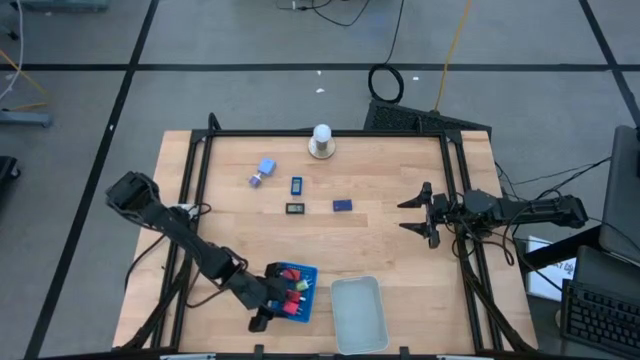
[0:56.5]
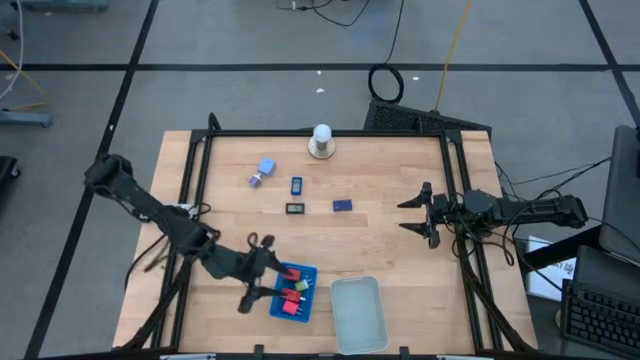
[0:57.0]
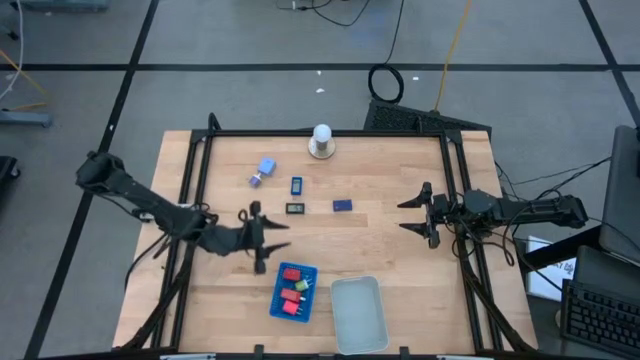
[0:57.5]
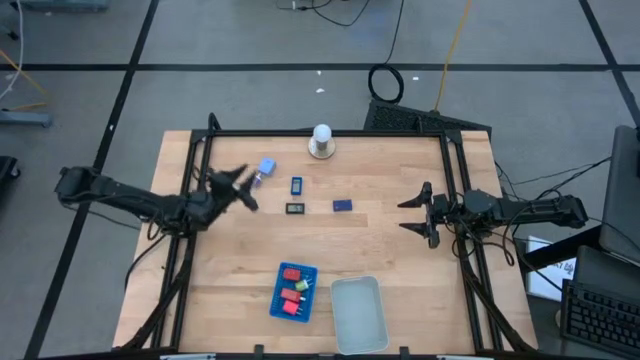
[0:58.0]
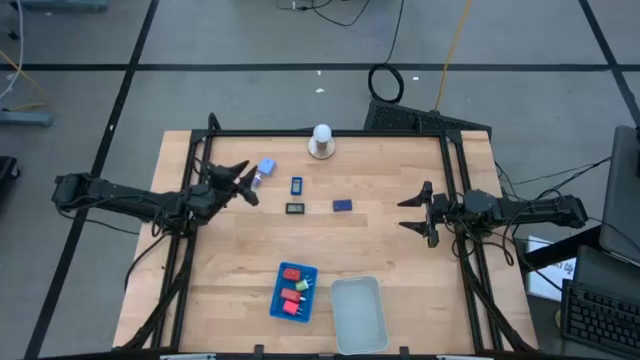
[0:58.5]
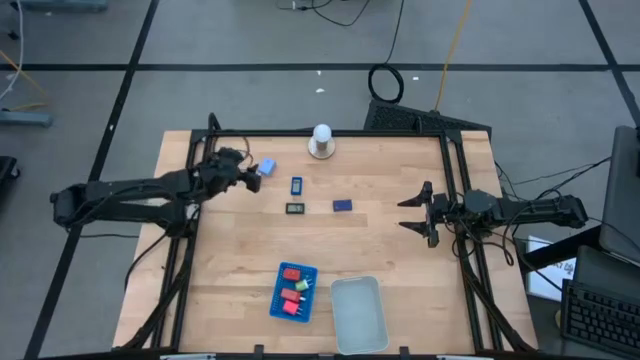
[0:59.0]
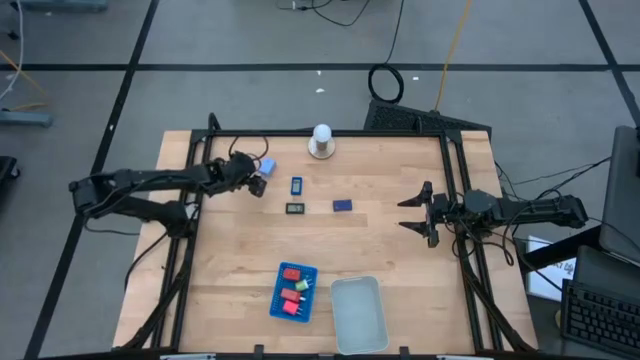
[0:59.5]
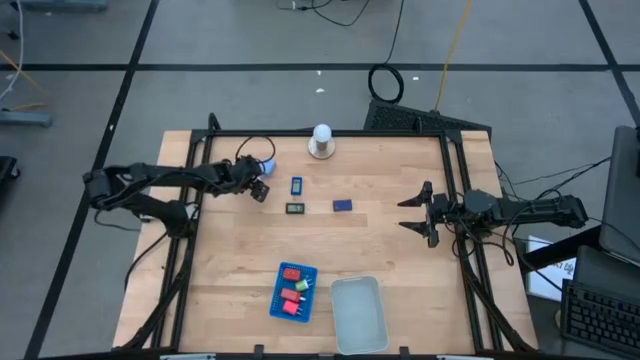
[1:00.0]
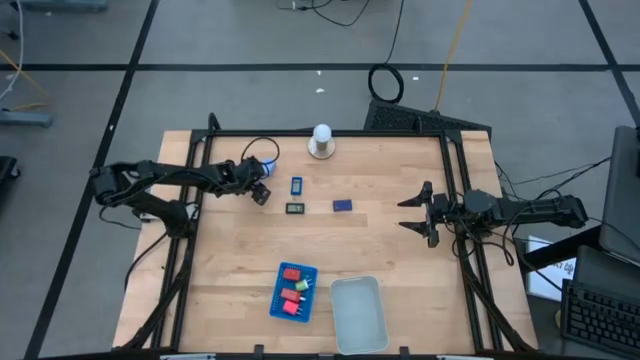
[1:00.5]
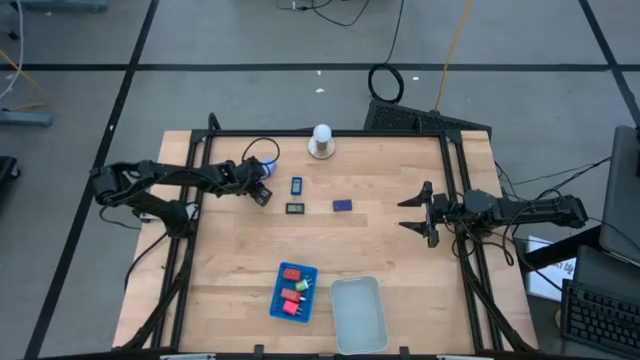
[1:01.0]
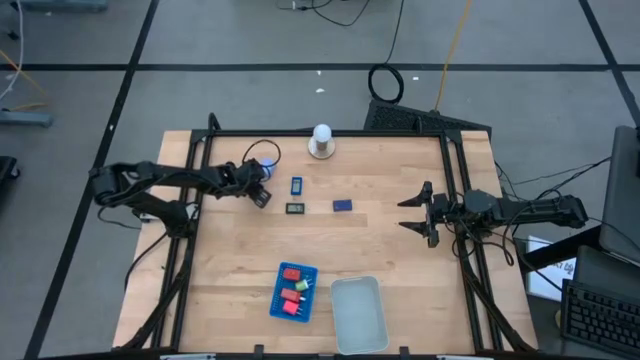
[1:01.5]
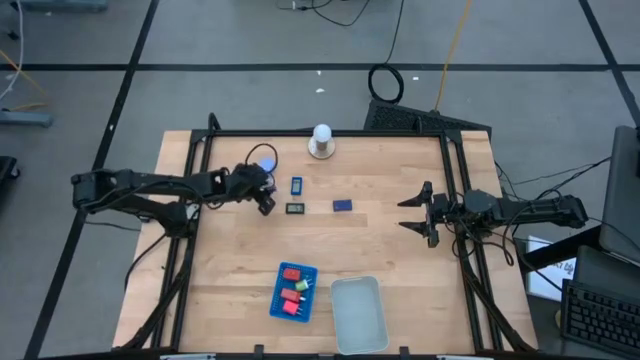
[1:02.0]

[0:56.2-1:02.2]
Task: Pick & Place Office items
Put the purple charger adapter into the blue bin

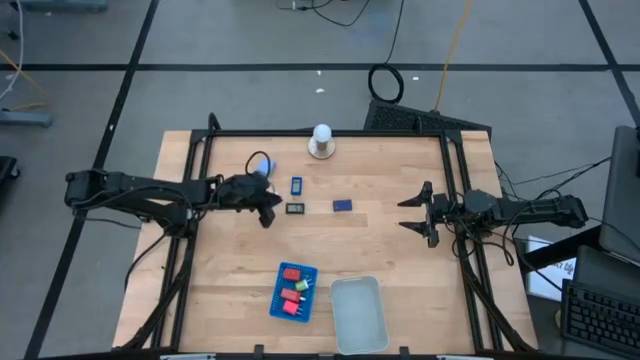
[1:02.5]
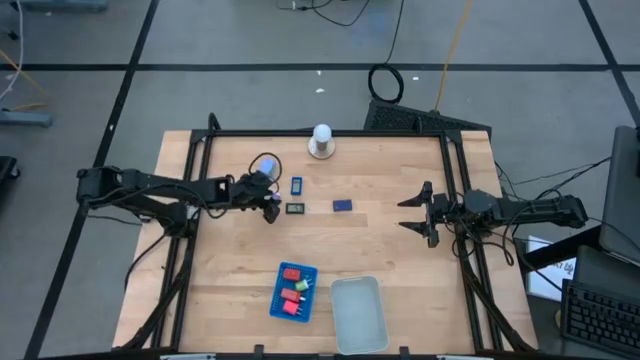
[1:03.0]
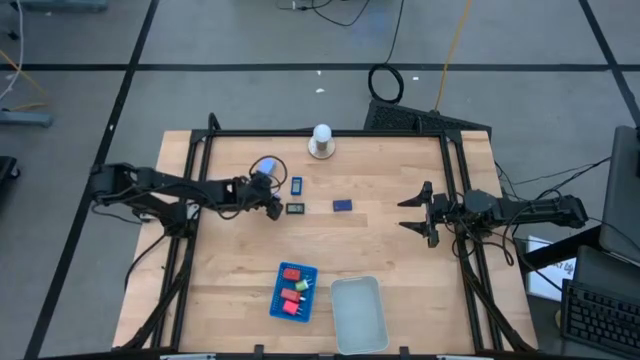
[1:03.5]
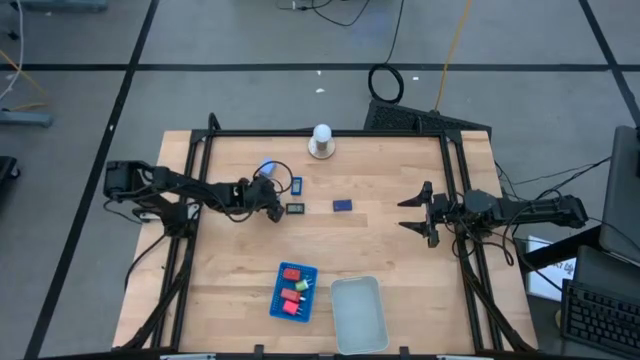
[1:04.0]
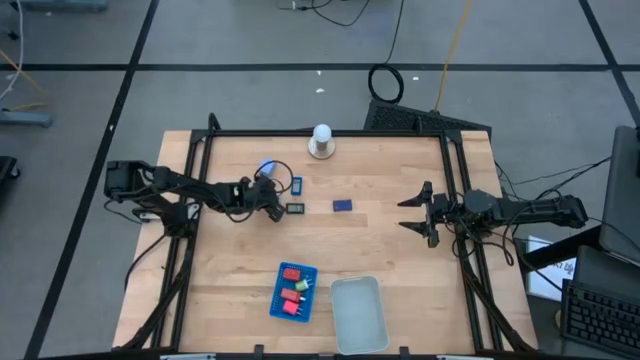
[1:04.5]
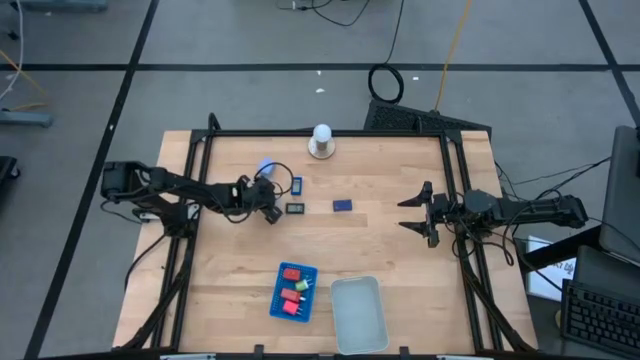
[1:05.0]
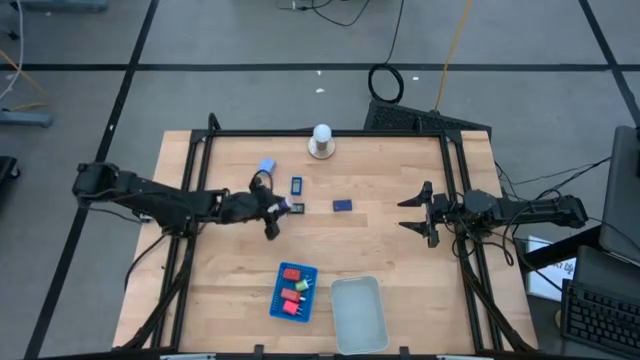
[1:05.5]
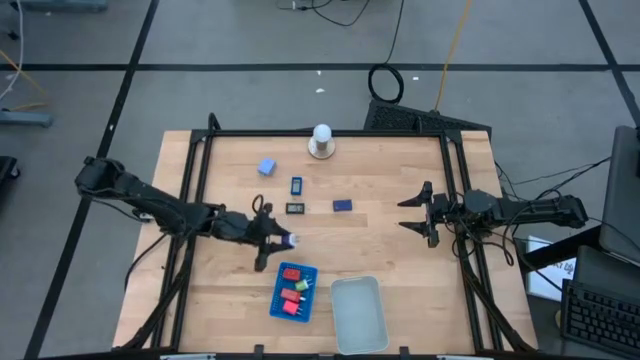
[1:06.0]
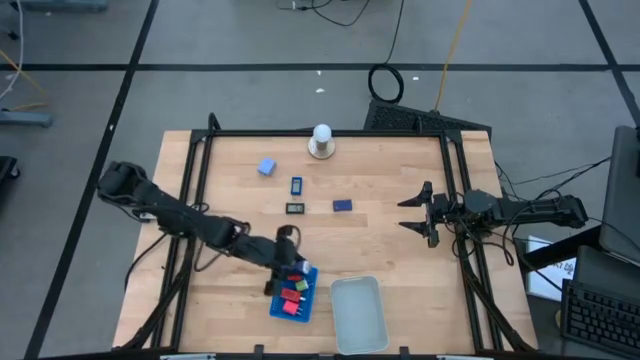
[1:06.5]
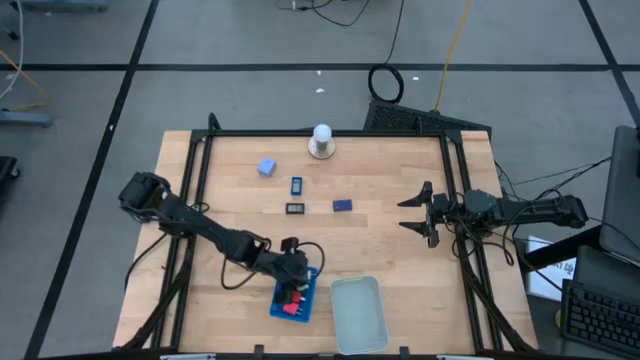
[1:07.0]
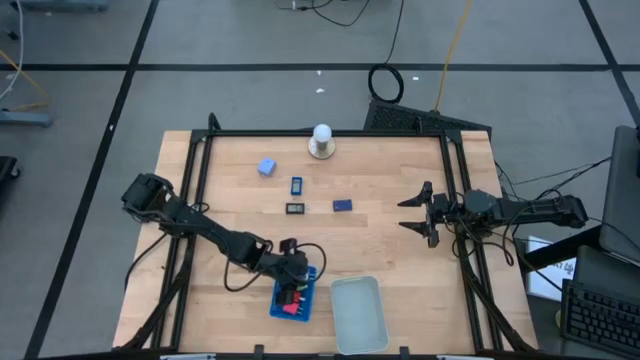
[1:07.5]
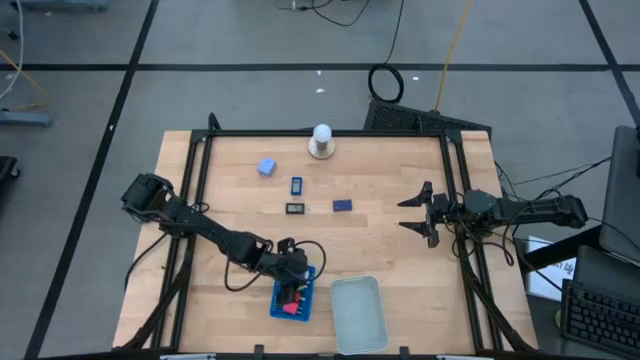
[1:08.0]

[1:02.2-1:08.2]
Put the purple charger adapter into the blue bin

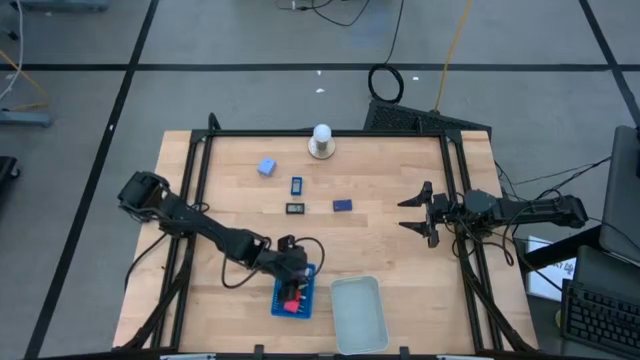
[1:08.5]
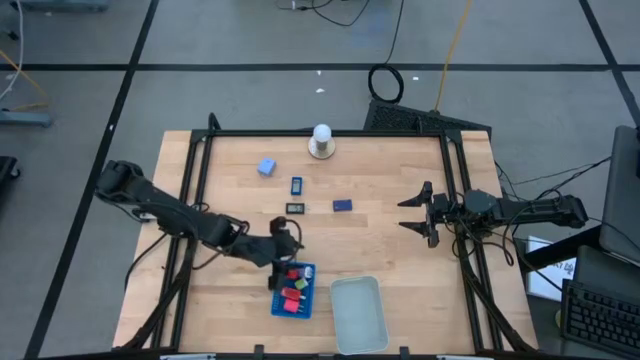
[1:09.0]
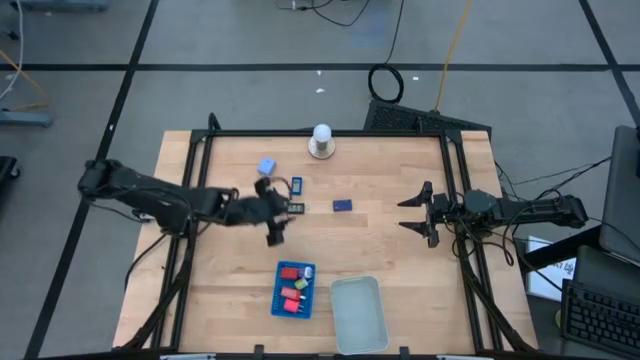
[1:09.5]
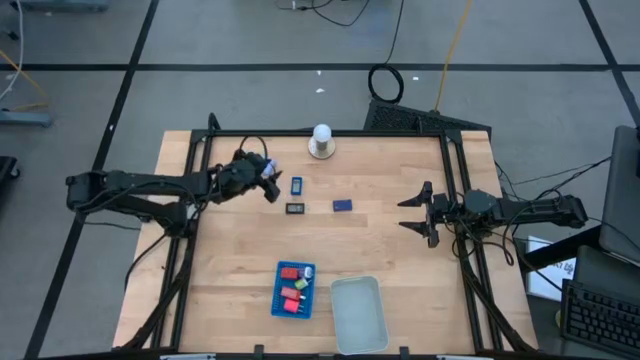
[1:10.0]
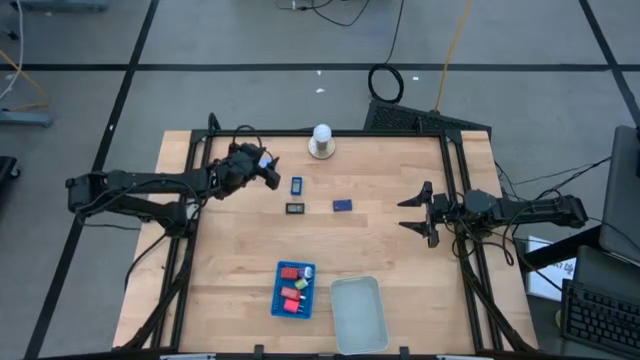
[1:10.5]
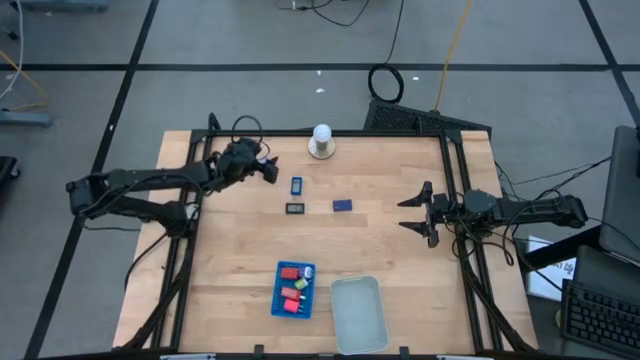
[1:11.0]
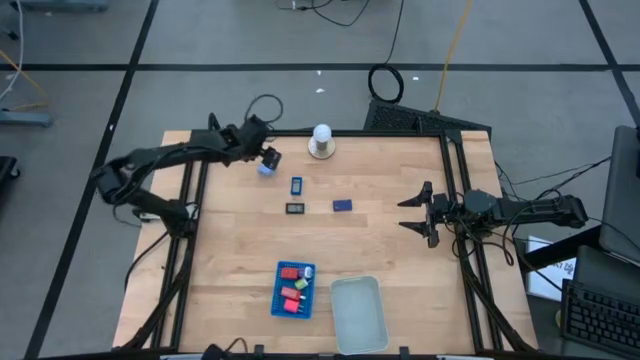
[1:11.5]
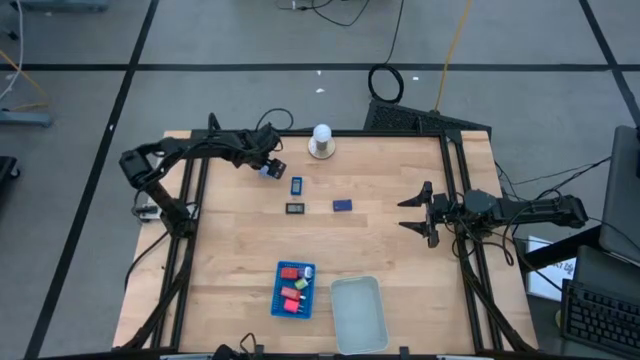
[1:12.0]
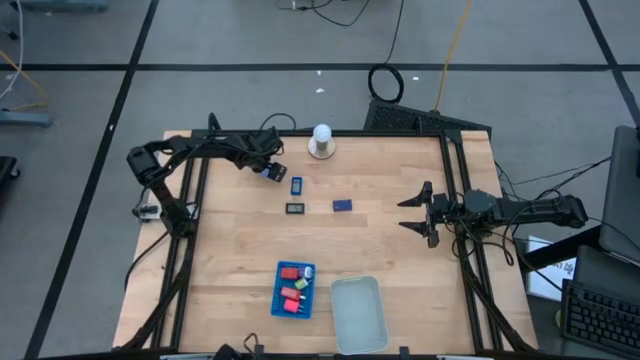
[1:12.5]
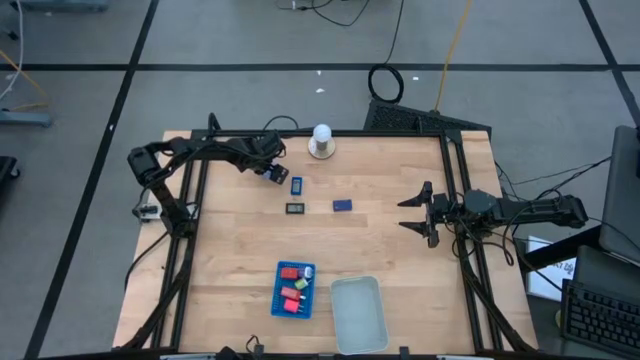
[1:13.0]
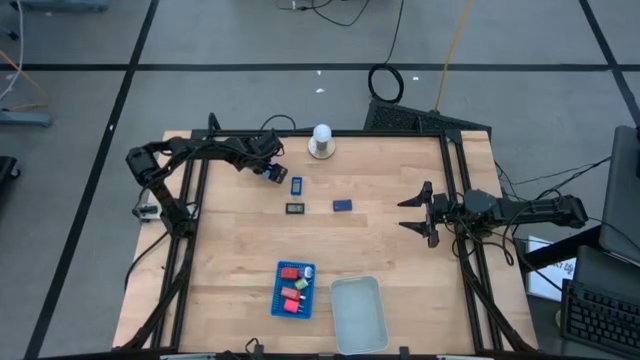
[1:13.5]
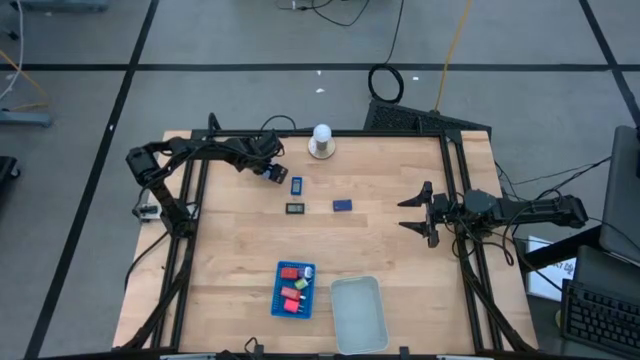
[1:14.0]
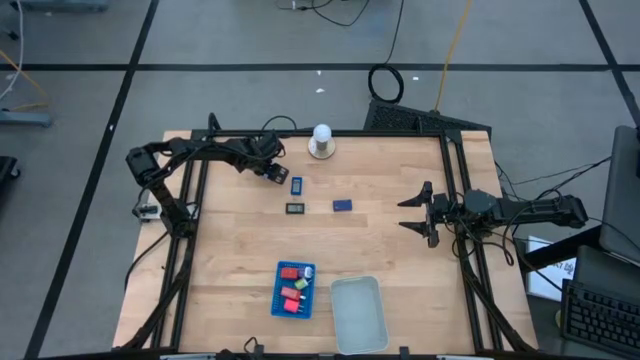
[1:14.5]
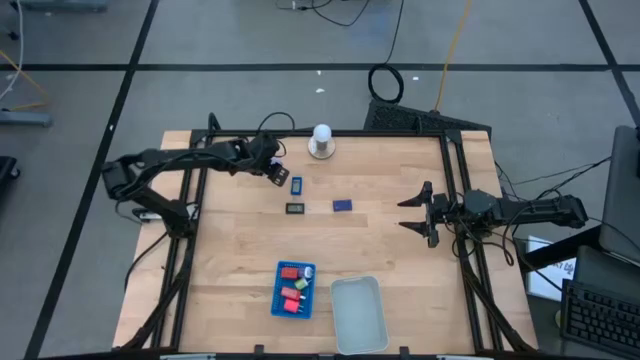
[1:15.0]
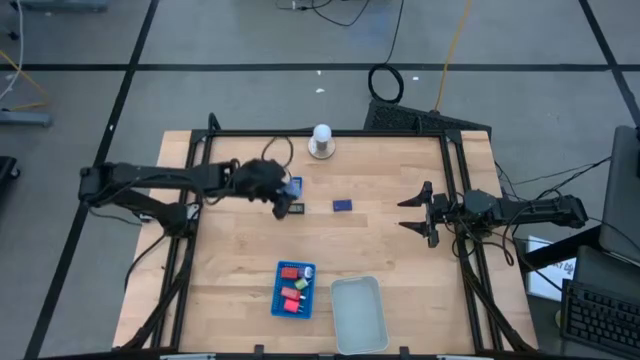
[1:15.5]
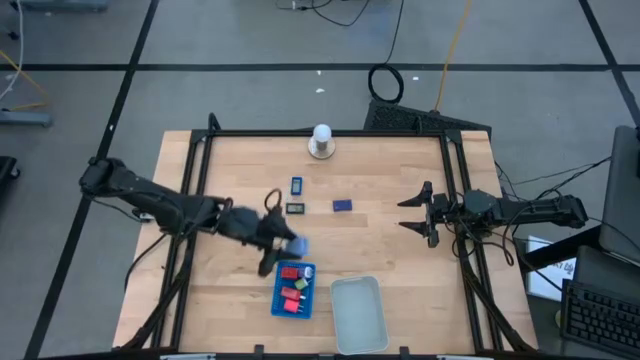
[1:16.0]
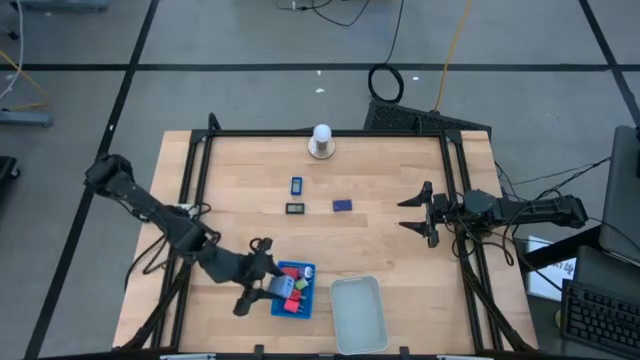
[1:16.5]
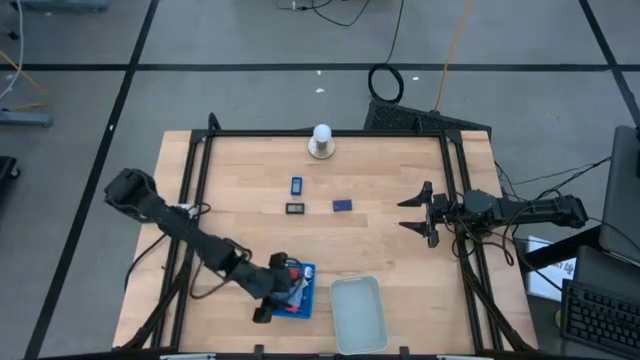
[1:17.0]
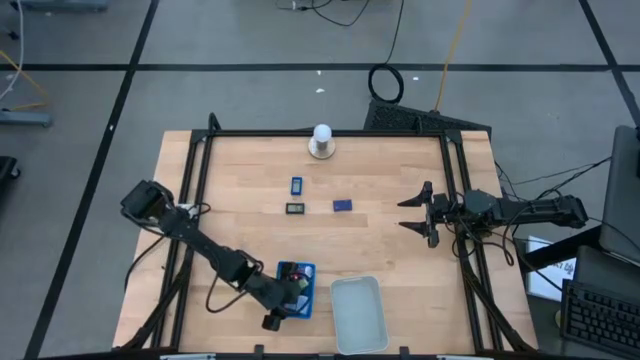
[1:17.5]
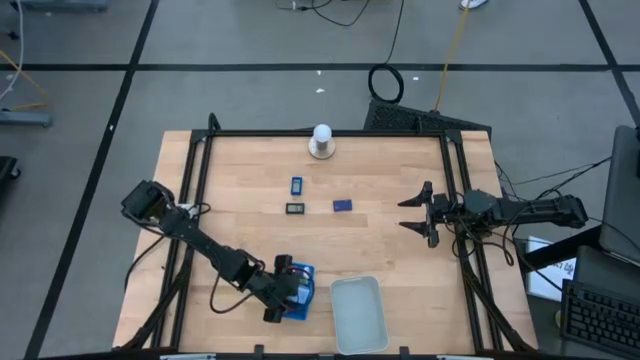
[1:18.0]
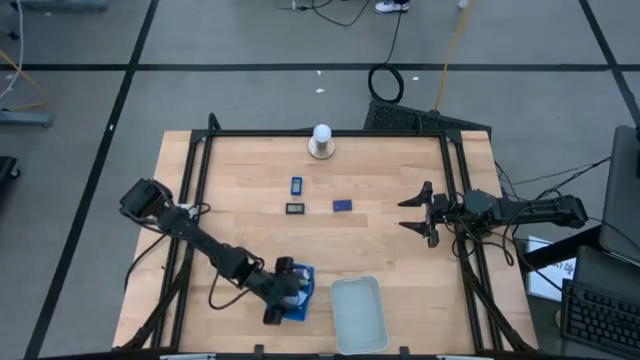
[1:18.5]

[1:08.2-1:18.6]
Put the white charger adapter into the blue bin
